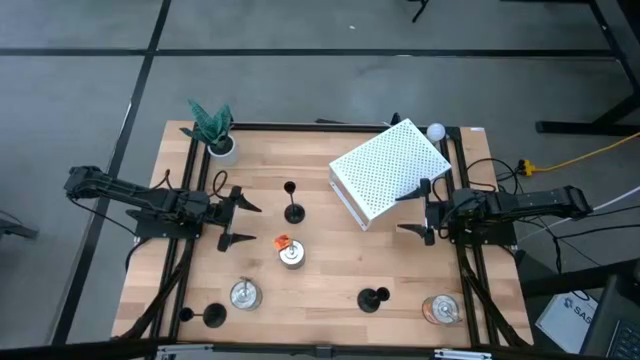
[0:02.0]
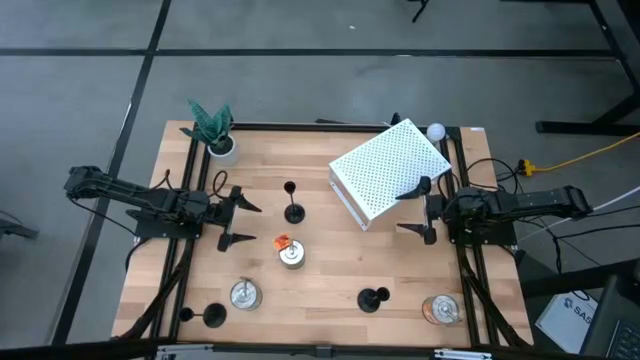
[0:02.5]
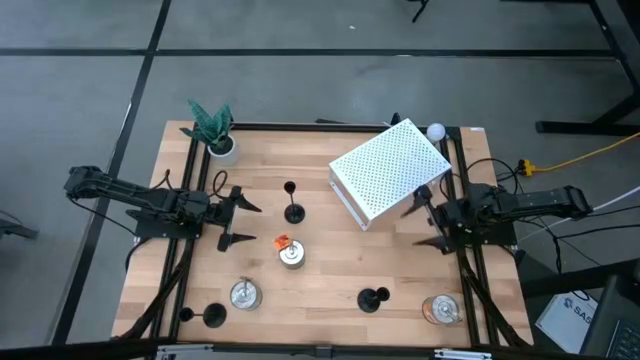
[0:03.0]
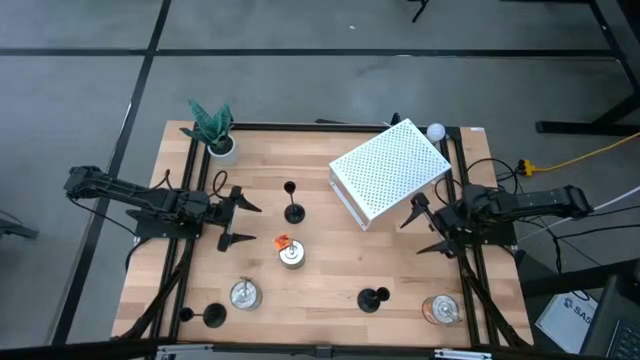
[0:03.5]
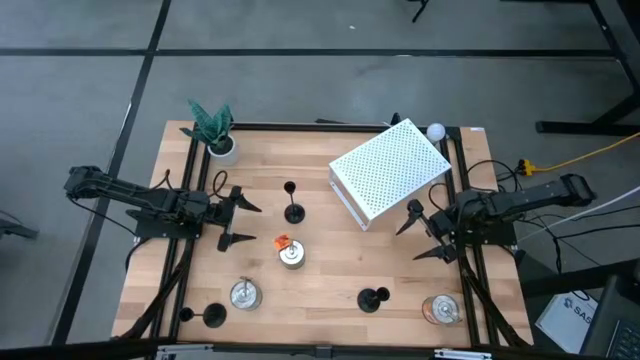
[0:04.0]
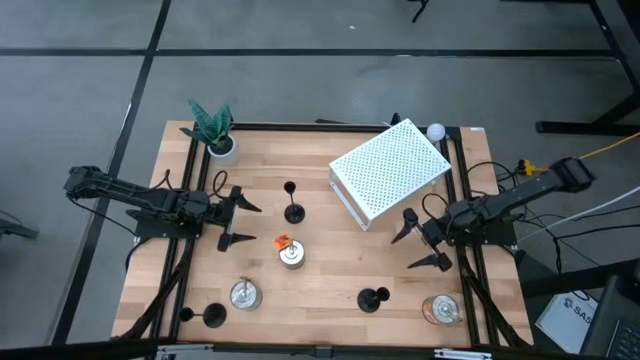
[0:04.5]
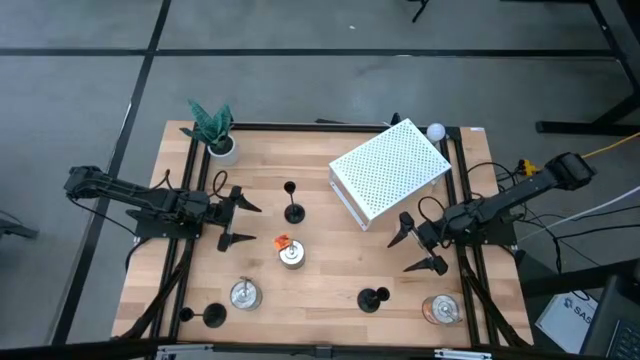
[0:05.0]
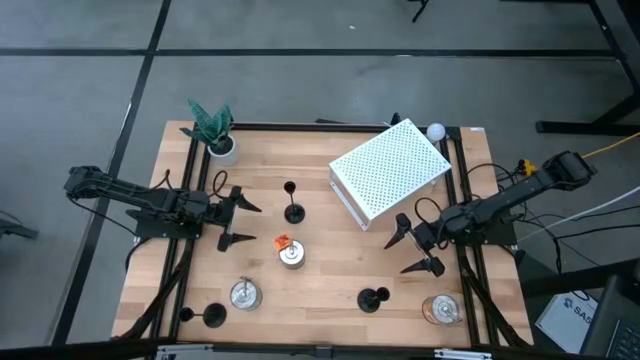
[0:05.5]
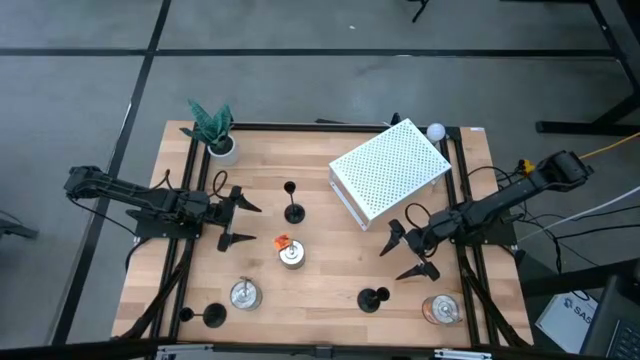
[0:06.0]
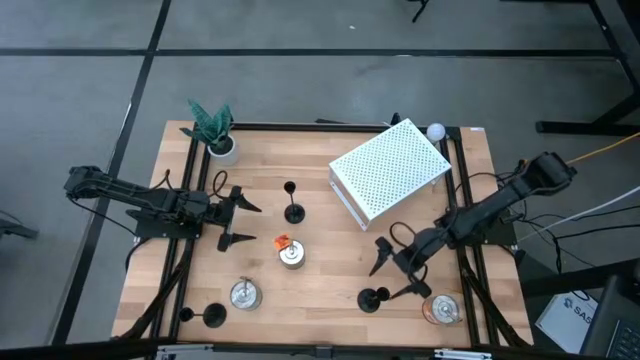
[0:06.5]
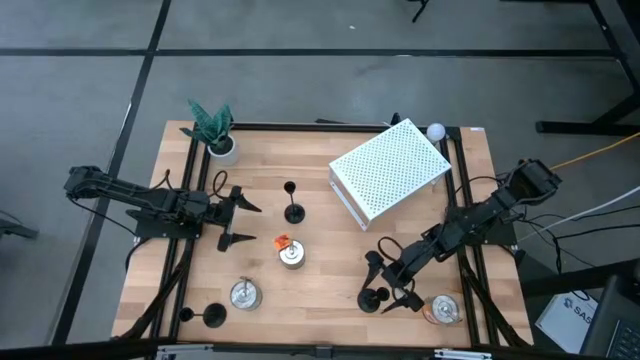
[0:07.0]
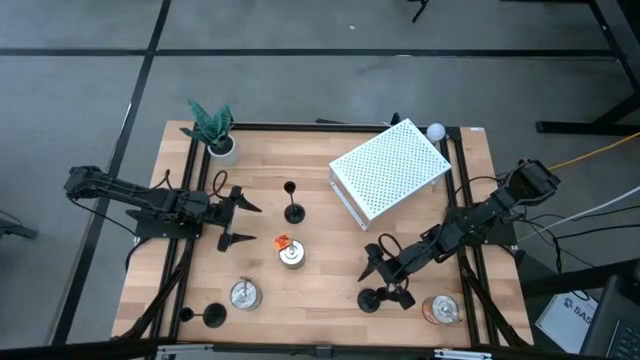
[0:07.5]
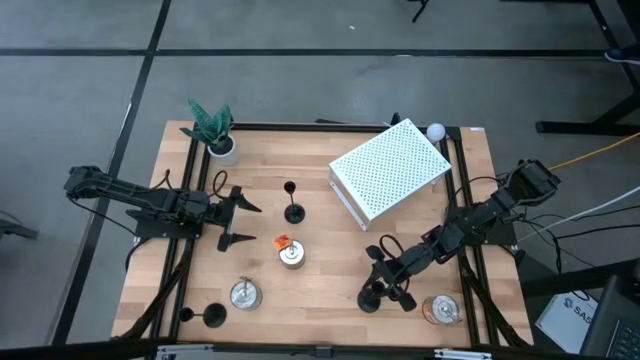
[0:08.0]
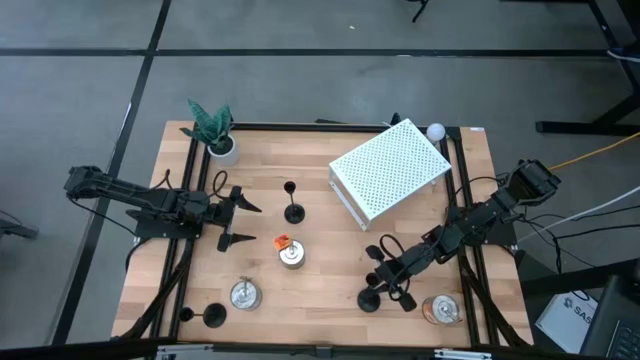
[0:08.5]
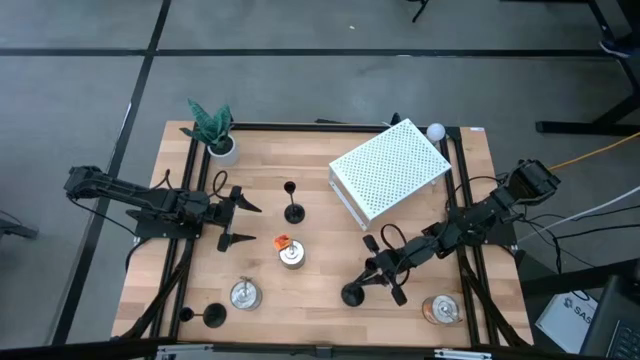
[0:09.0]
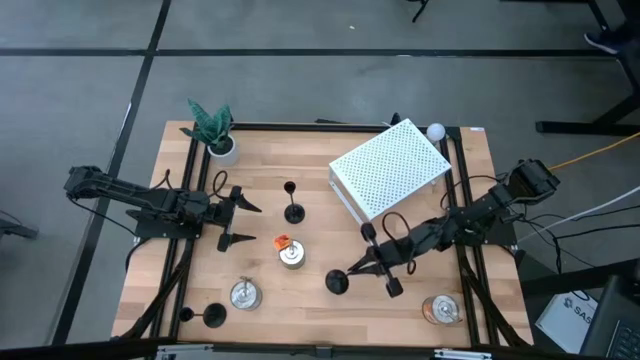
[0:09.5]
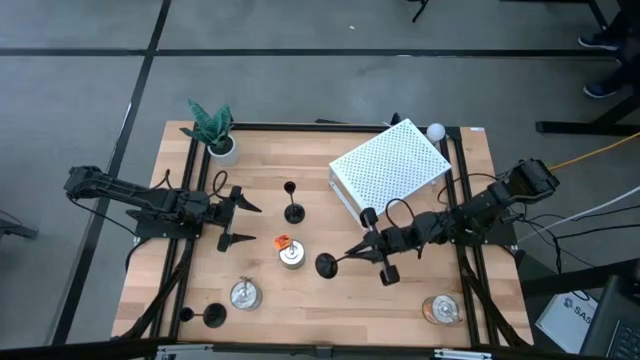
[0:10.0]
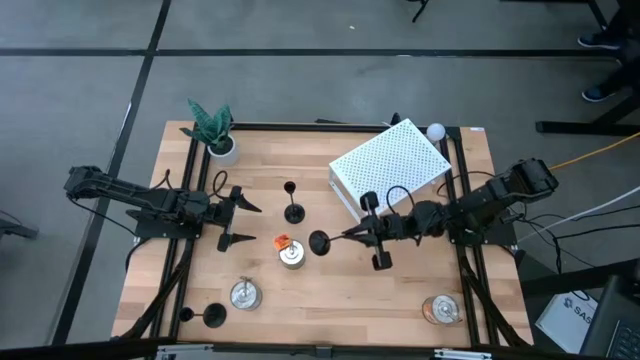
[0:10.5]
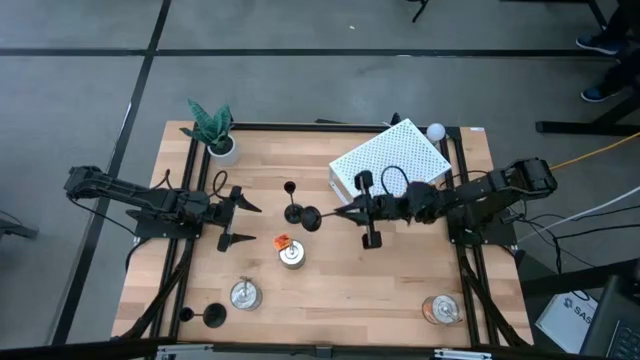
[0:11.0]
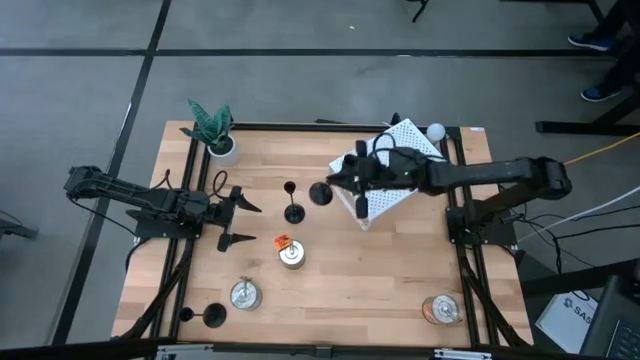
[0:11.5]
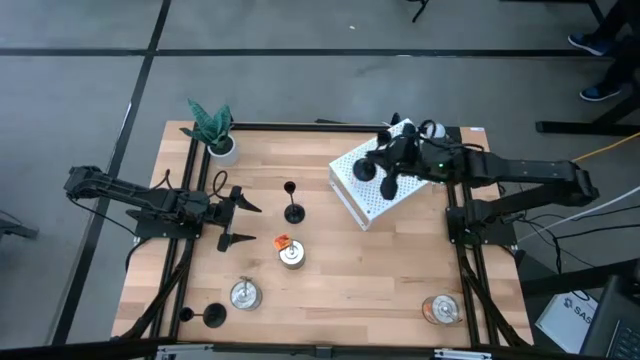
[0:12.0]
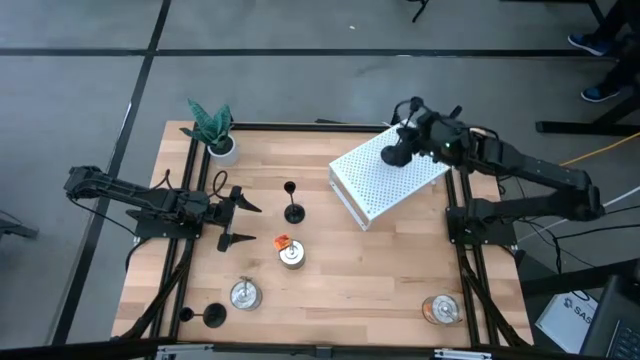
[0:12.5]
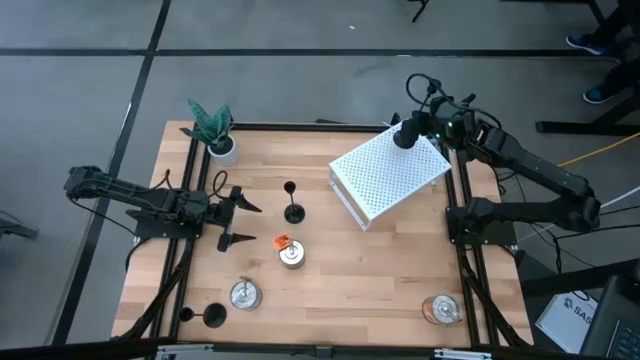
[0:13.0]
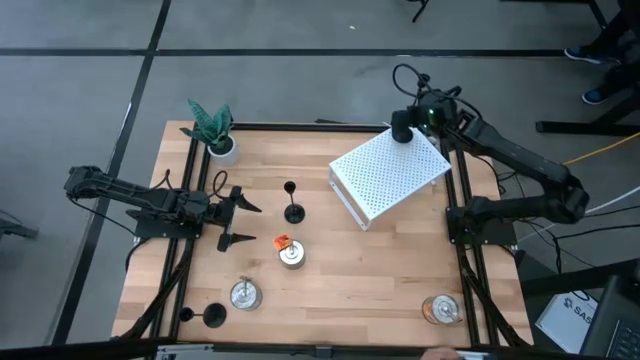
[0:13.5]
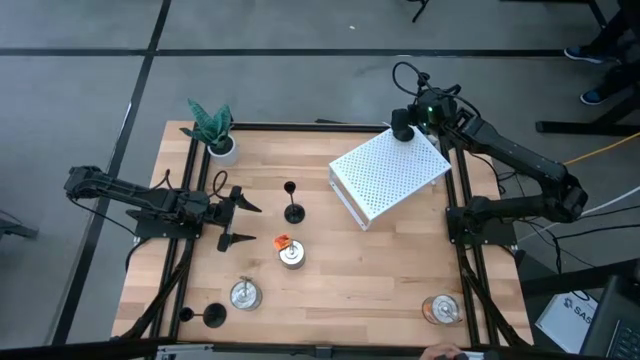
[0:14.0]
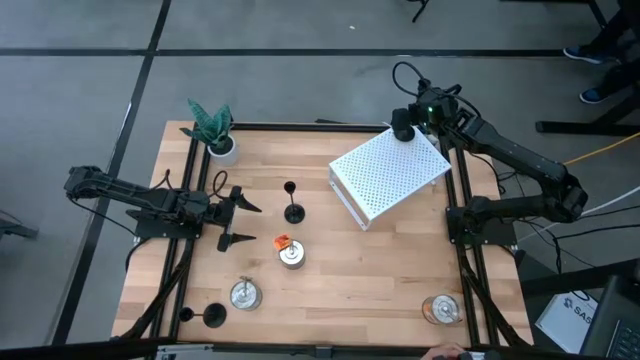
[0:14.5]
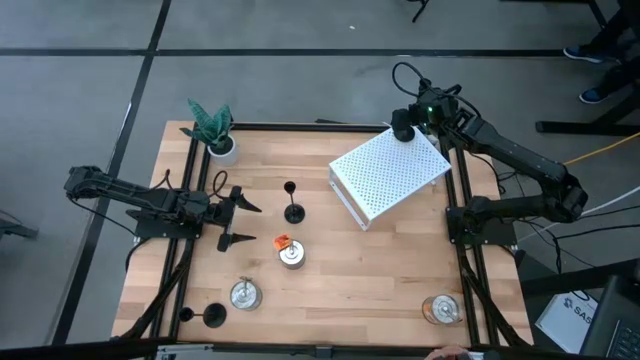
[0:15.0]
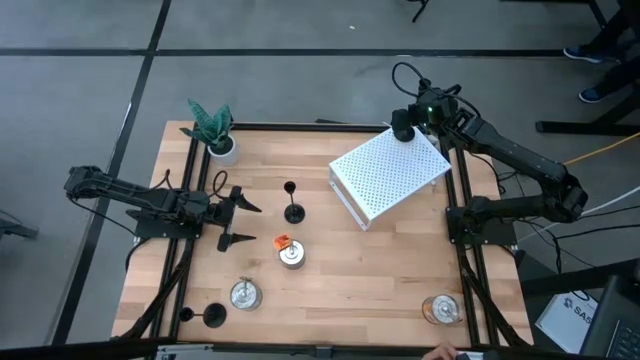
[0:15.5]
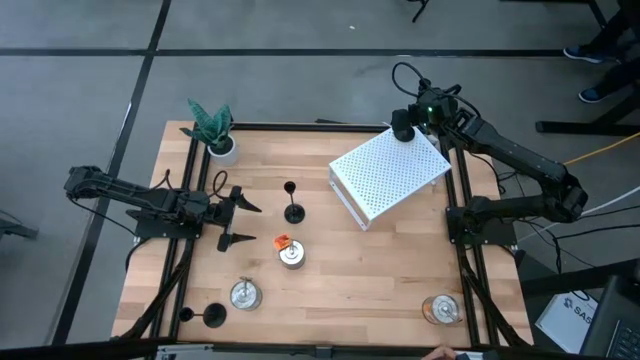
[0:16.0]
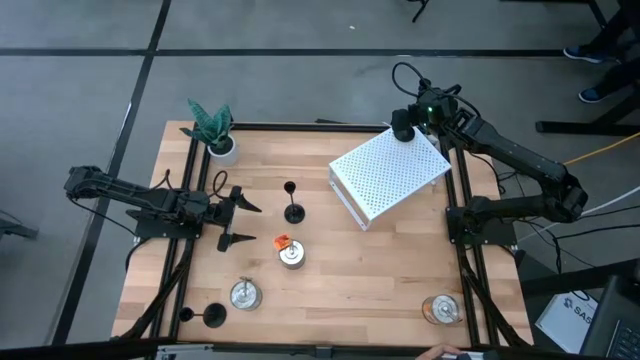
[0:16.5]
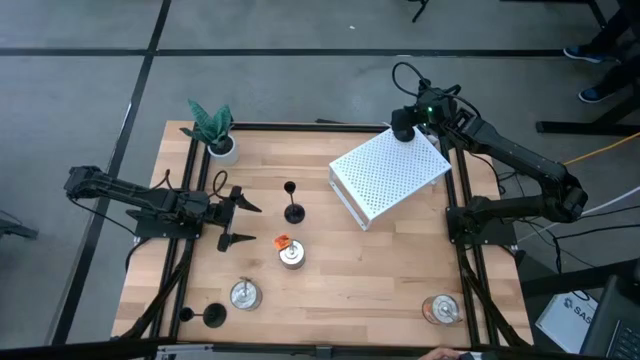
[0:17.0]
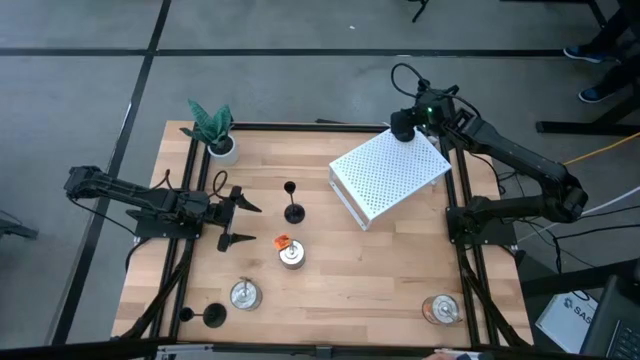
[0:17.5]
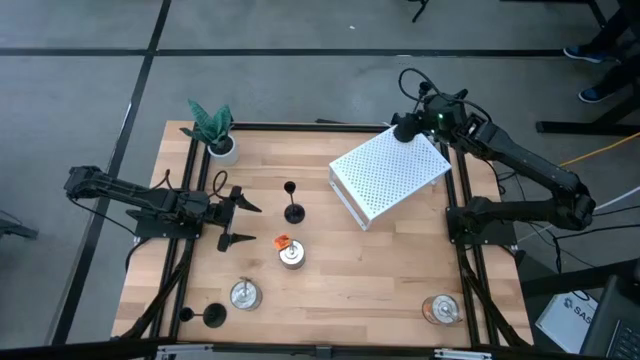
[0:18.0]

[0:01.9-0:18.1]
Task: Pick & Place candle stick holders
Put the bottom right black candle holder on the shelf

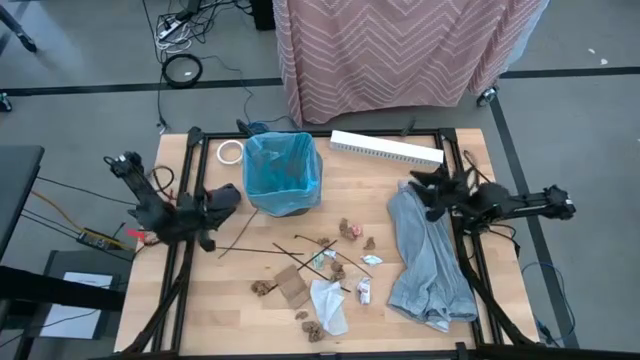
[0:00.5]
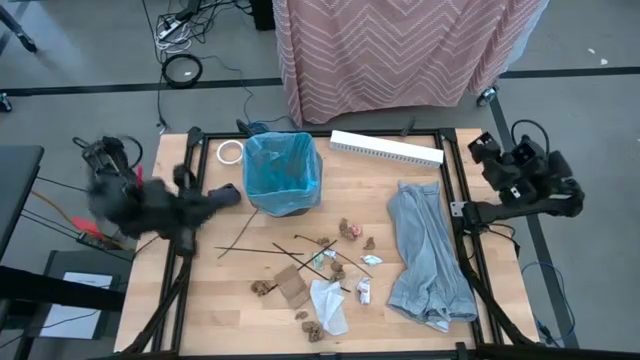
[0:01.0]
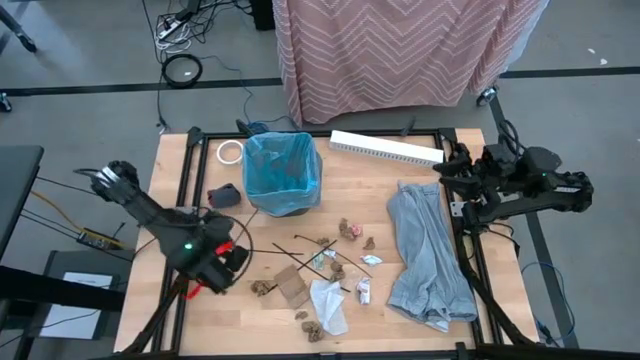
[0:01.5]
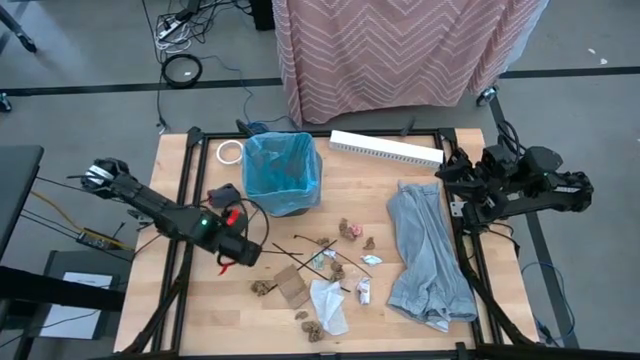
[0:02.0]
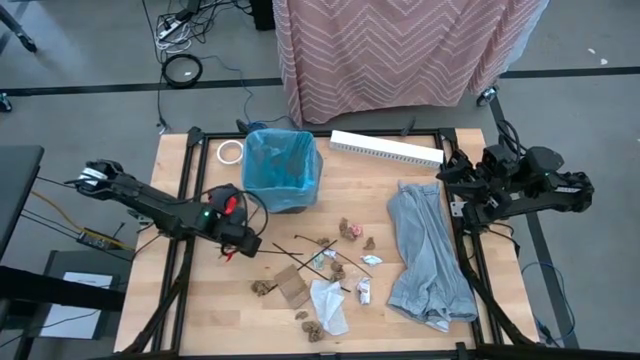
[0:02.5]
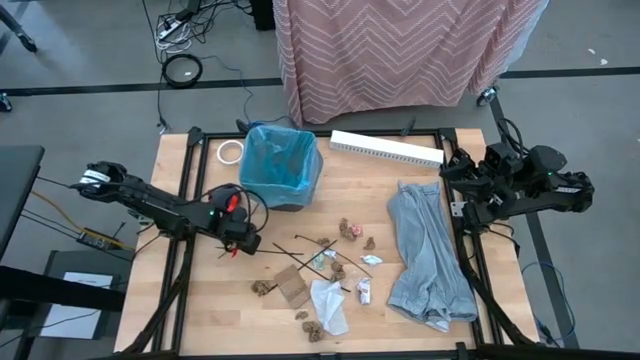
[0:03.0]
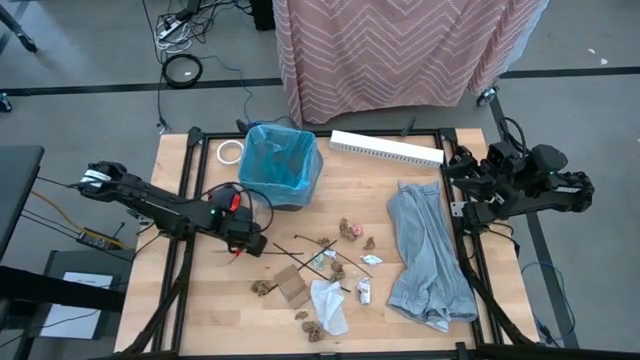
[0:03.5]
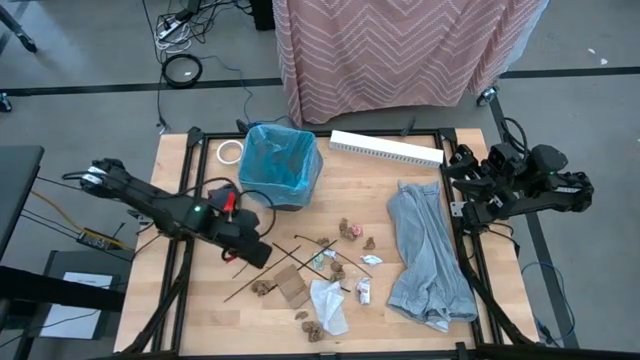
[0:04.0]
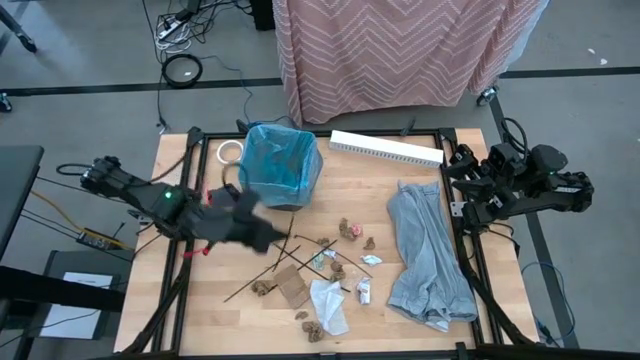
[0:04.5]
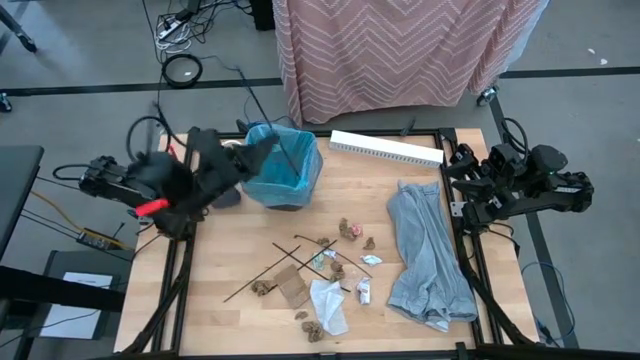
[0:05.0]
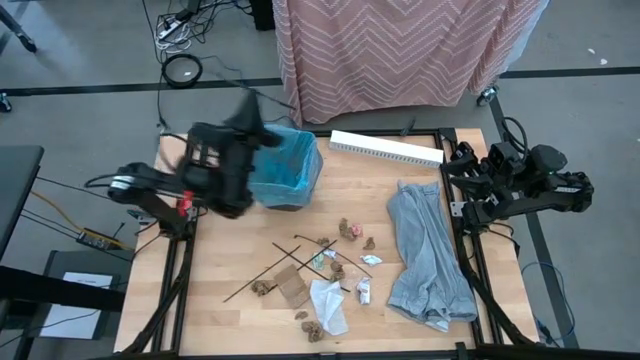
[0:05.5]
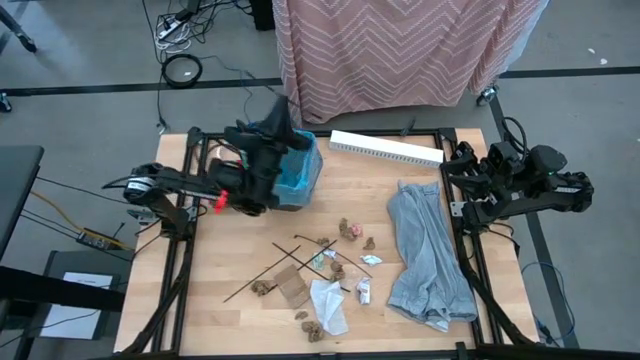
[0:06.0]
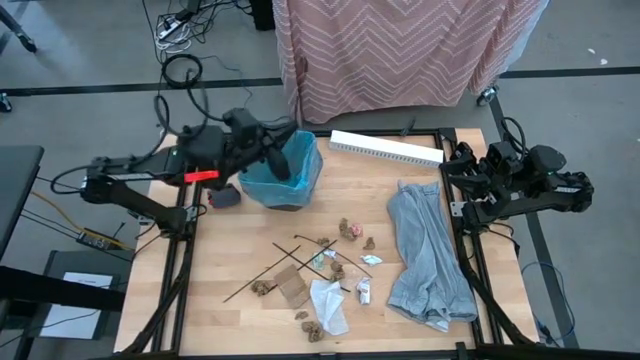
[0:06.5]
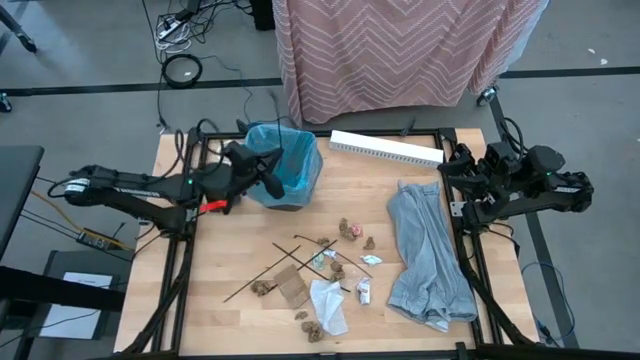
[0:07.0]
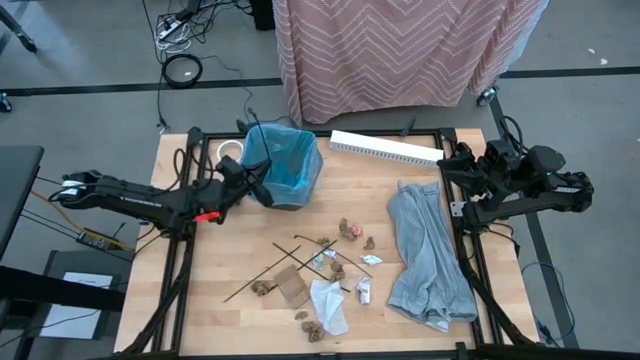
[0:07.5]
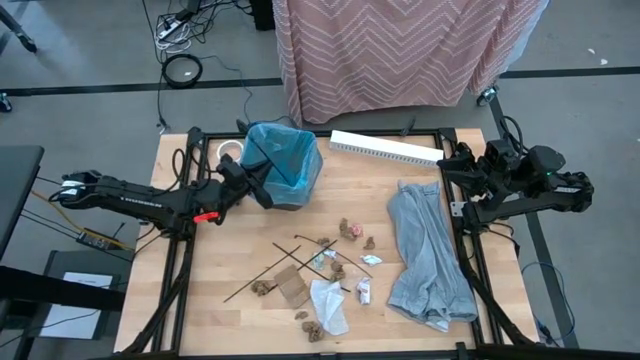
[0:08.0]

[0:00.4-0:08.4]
Task: place trash/remove bag and relplace
Put the black zip tie into the black trash bin
